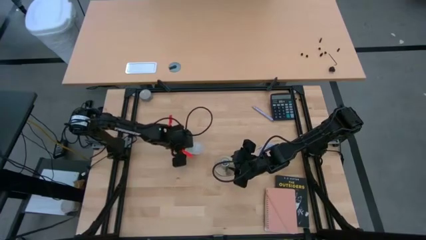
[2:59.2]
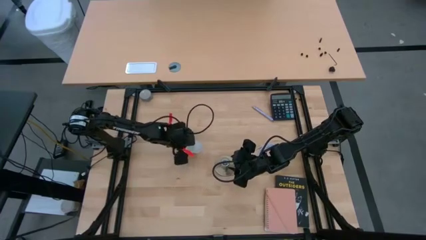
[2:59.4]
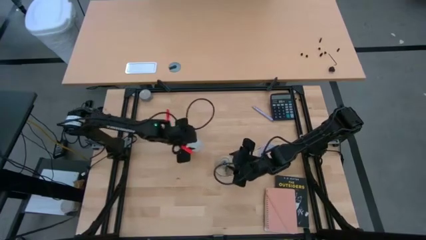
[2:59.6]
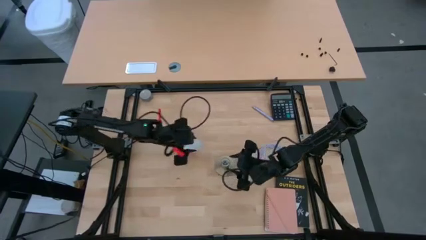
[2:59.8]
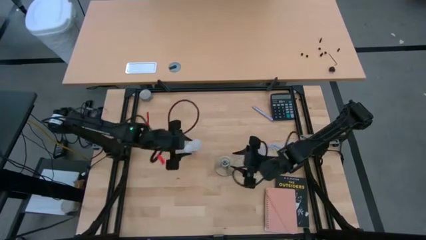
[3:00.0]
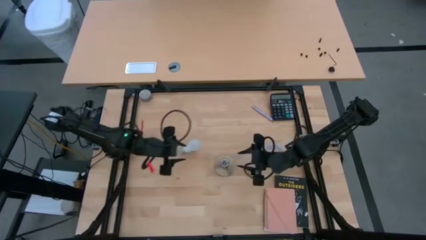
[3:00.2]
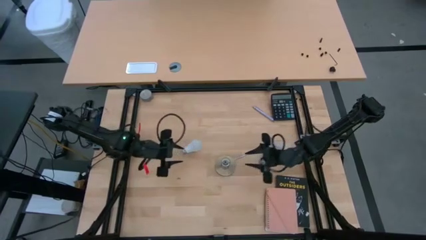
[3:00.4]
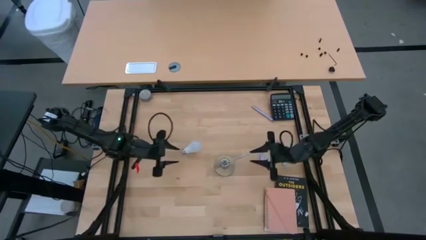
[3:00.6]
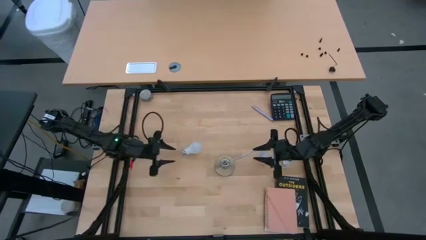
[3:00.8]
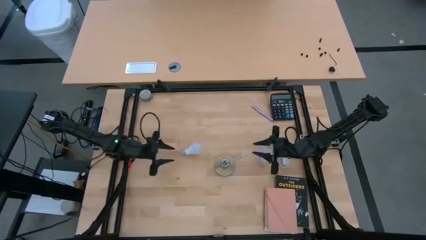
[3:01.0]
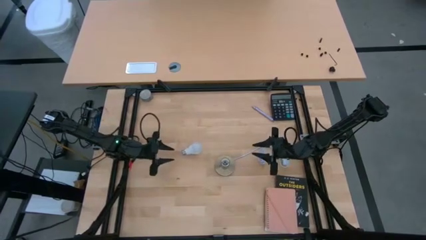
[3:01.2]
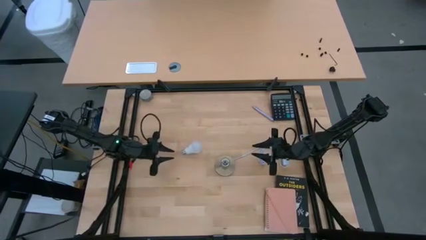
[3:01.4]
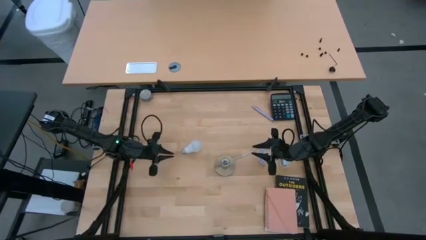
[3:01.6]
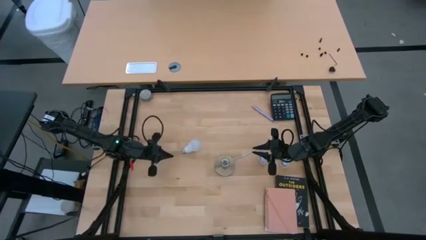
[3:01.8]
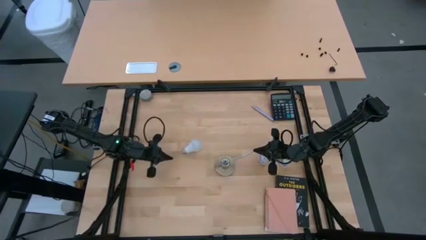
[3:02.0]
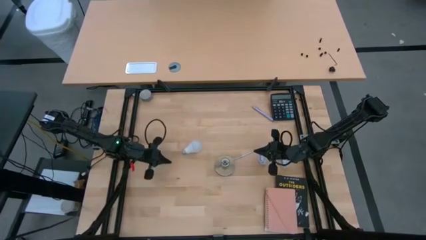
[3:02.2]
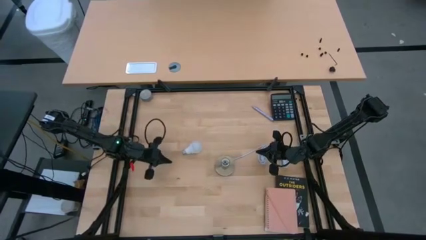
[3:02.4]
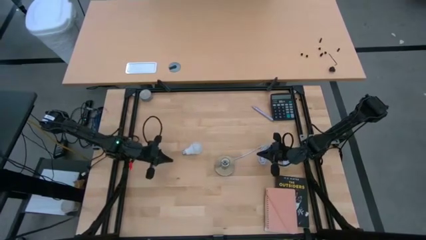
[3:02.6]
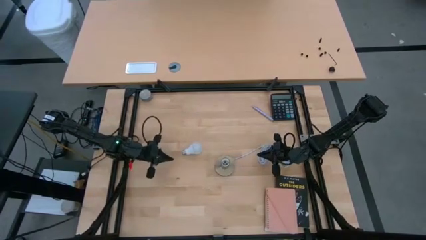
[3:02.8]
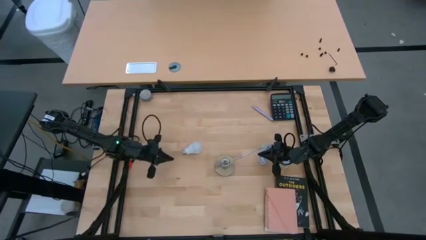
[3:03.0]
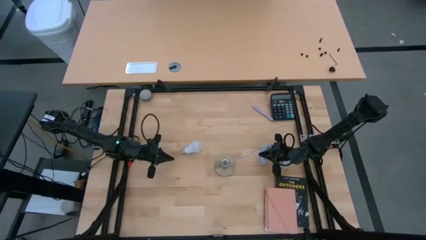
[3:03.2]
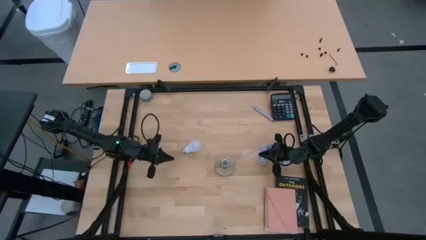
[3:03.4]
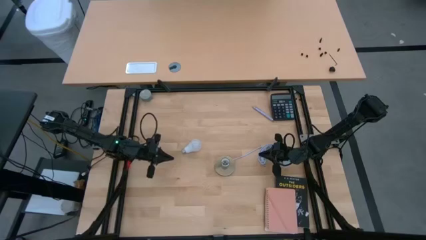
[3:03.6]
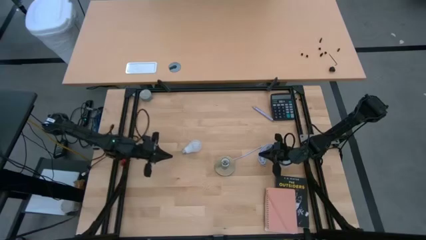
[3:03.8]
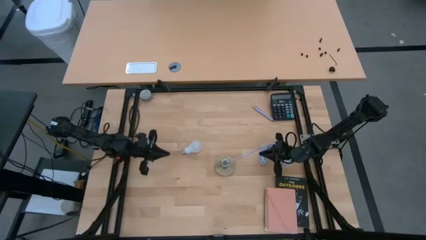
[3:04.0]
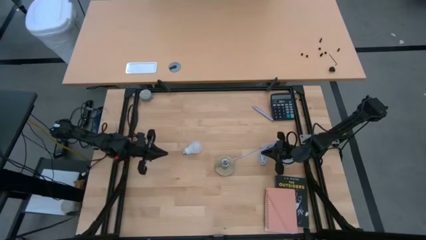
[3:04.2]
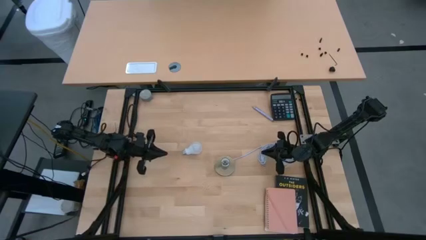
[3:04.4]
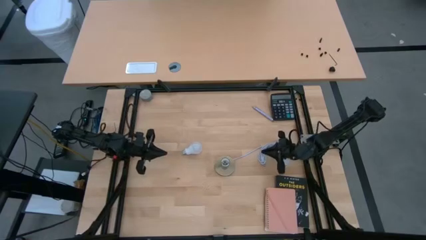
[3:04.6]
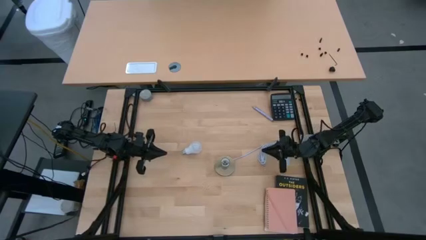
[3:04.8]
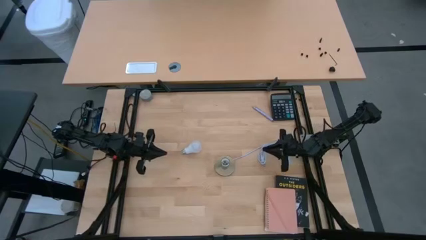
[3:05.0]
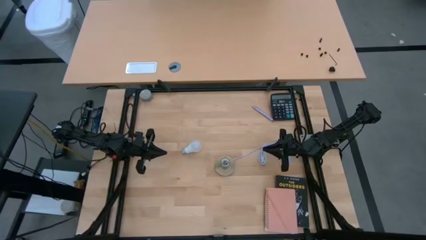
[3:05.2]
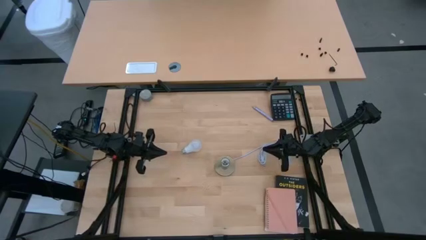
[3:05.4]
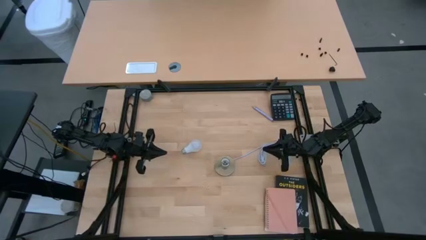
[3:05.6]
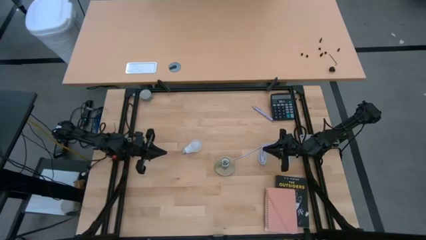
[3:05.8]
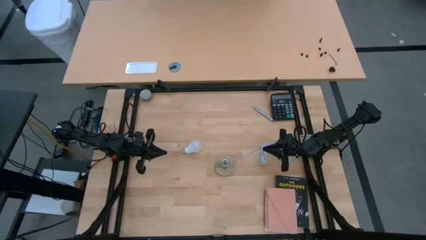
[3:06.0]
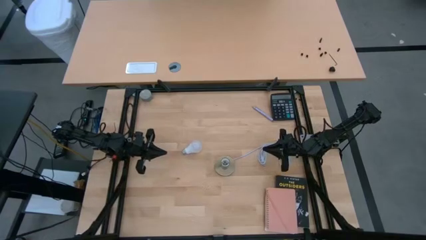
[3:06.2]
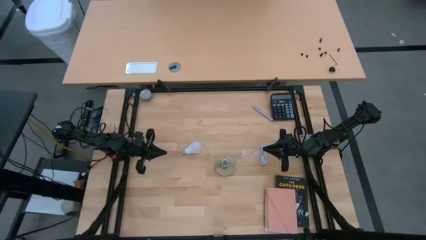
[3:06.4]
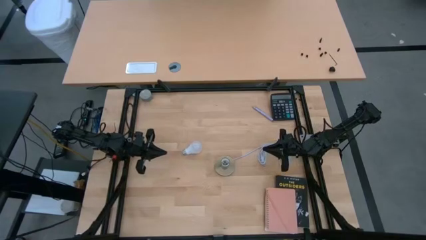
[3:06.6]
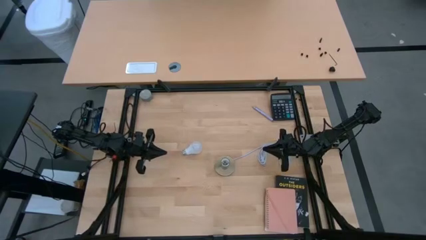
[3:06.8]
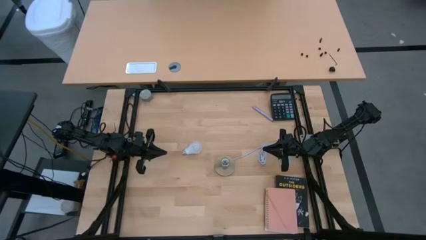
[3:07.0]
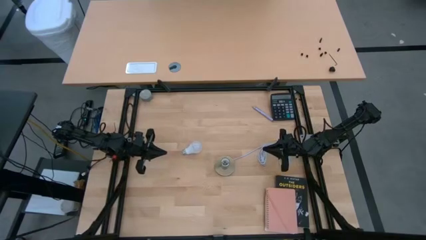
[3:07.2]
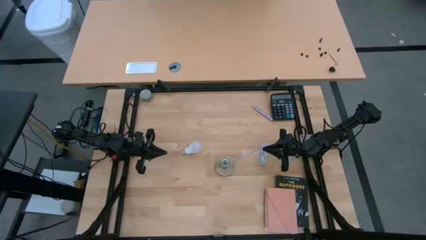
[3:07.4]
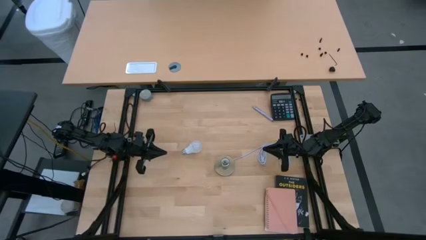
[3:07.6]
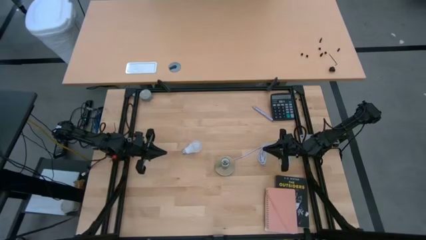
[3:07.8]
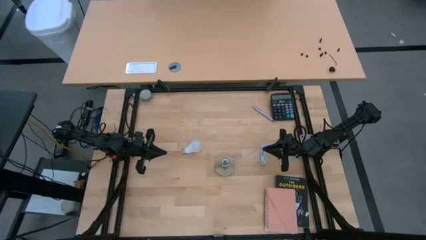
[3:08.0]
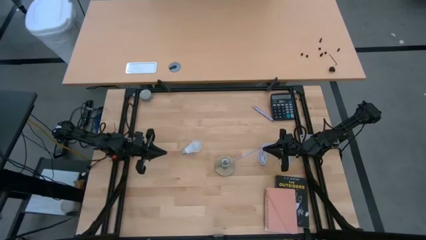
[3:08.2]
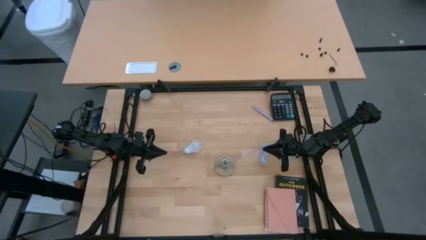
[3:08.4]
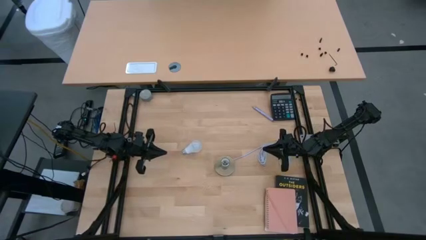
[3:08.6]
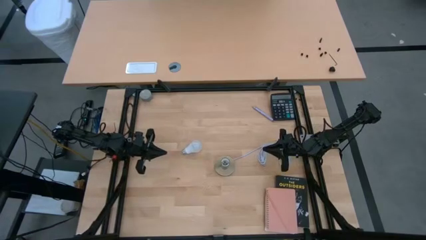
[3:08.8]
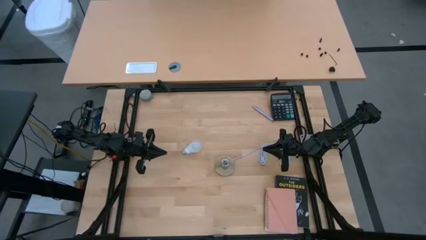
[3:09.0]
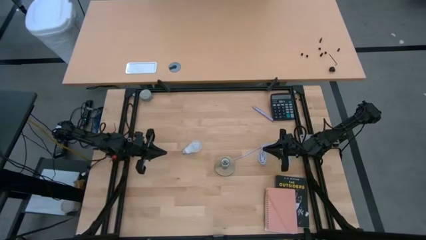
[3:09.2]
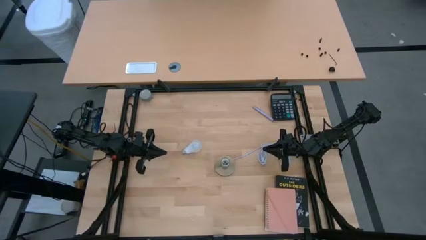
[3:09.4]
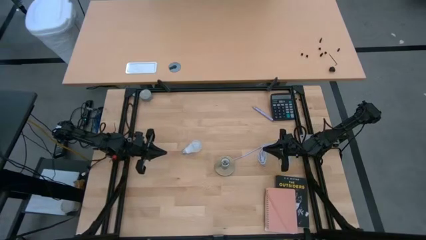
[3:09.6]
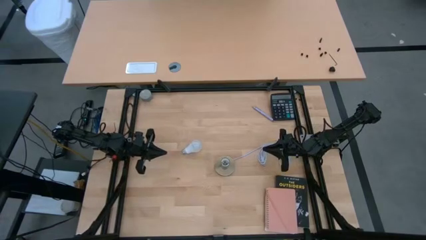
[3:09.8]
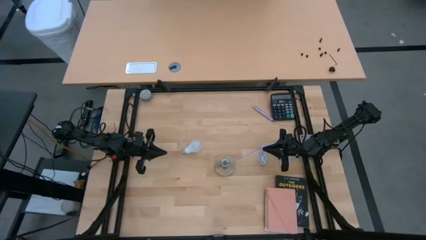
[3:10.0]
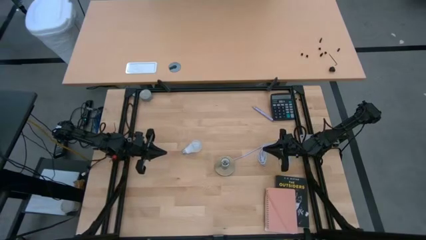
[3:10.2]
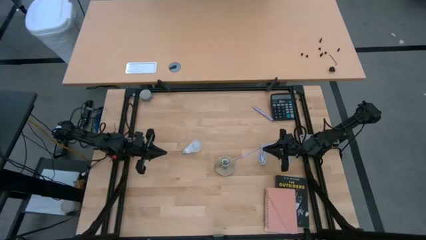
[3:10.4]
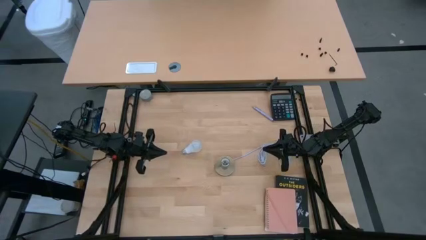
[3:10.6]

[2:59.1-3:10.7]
Task: Screw lightbulb
Return to Home Position
